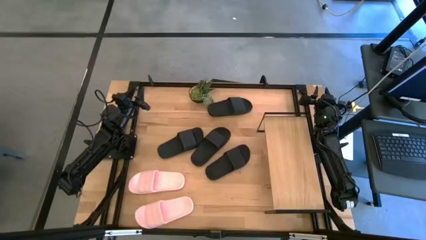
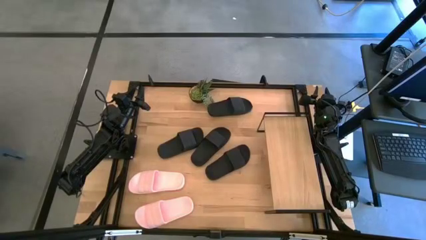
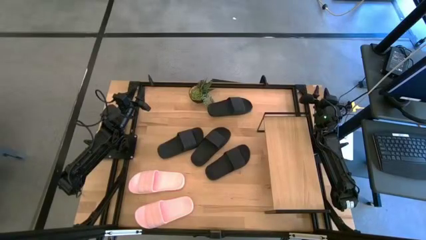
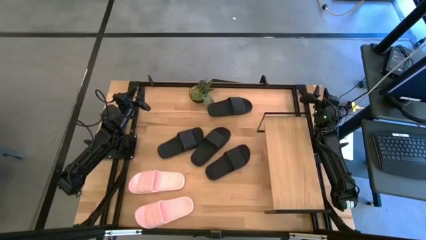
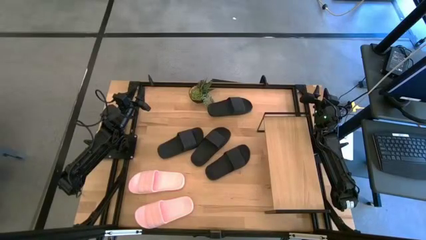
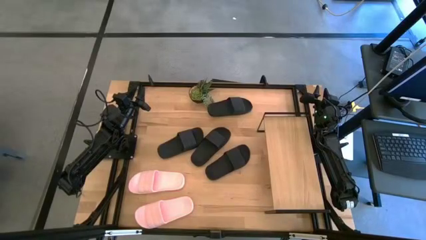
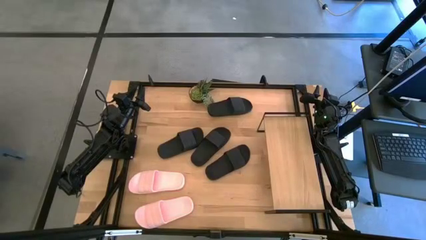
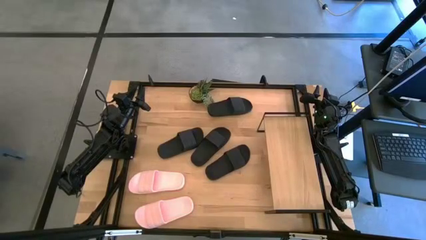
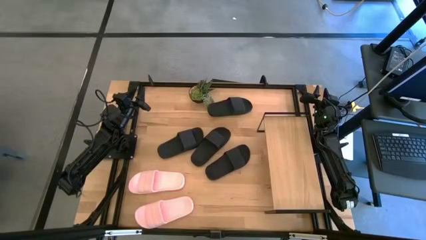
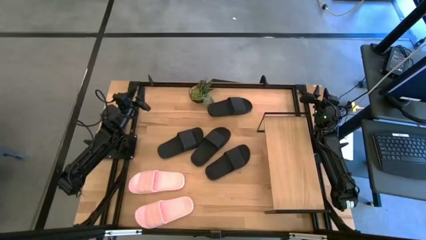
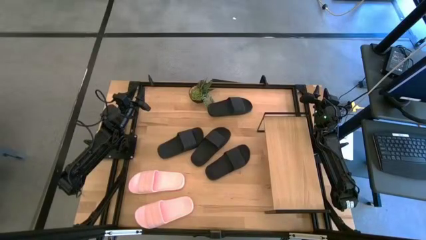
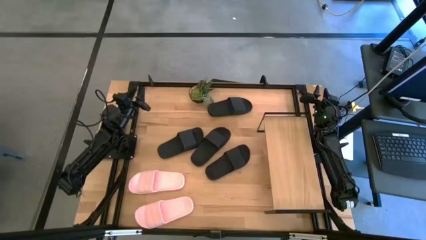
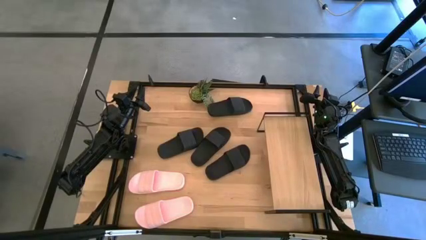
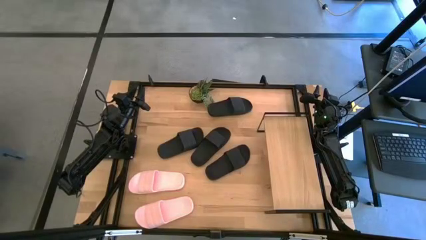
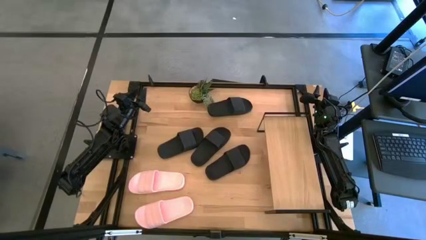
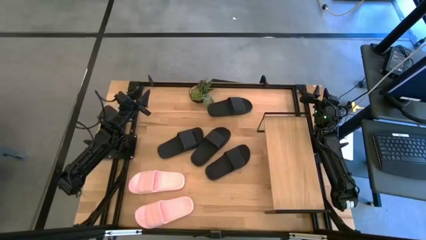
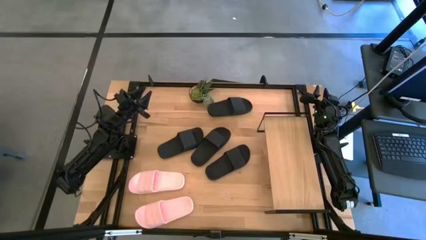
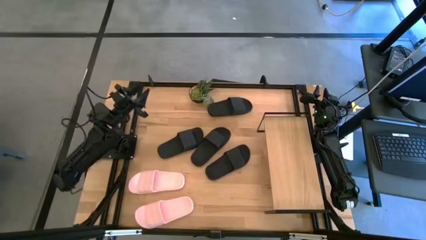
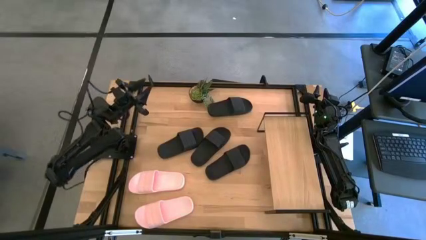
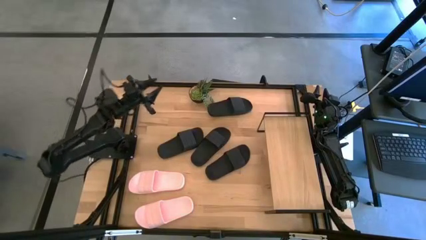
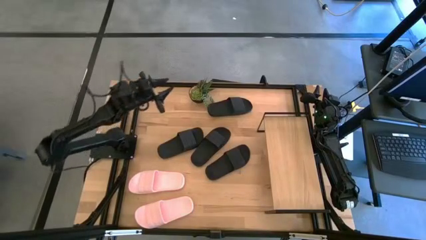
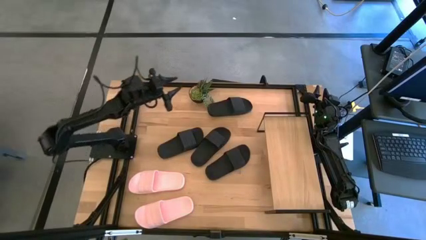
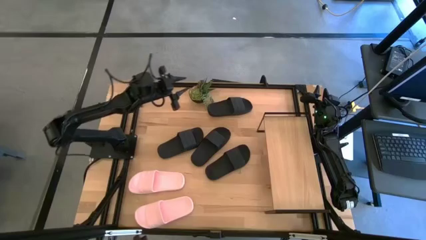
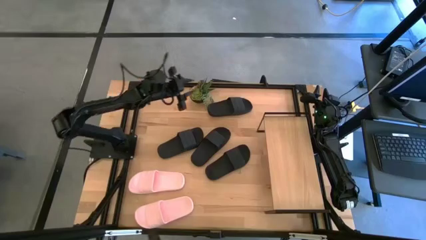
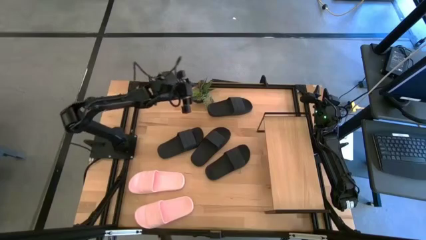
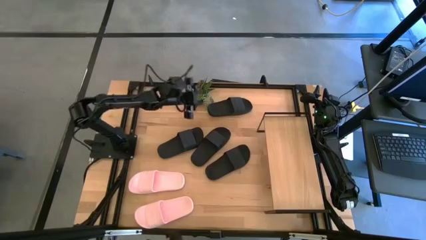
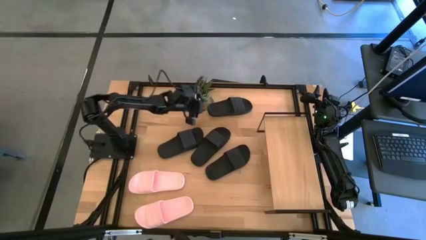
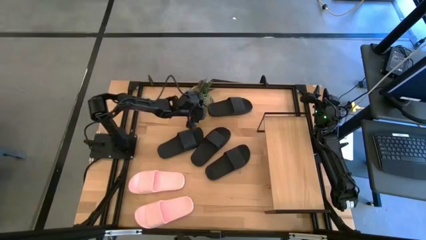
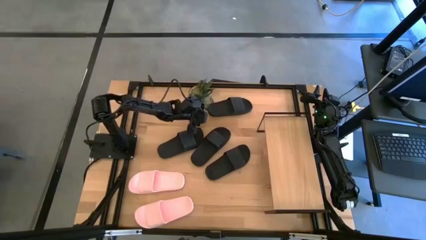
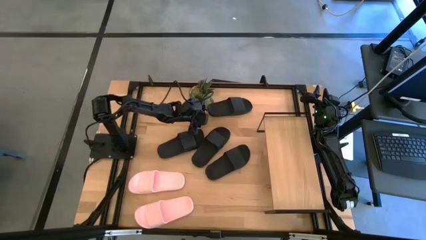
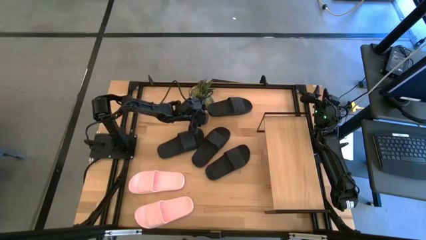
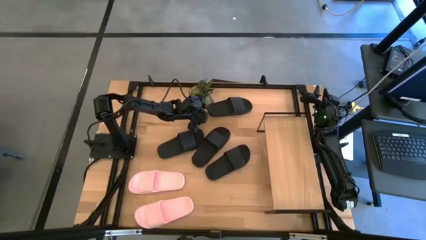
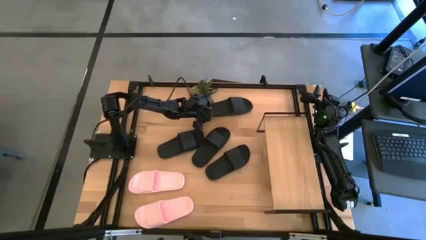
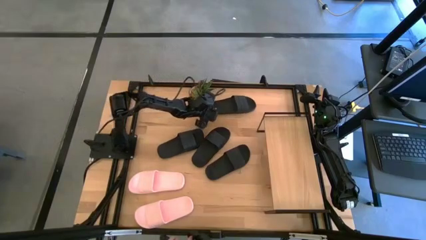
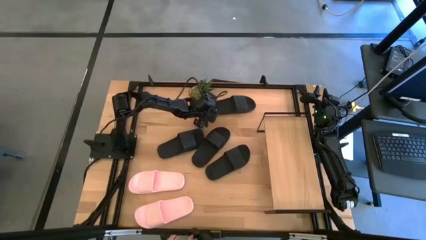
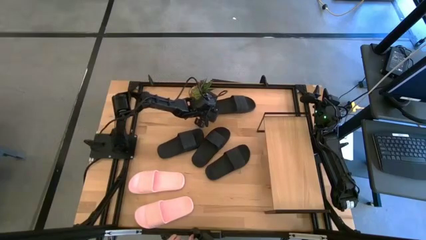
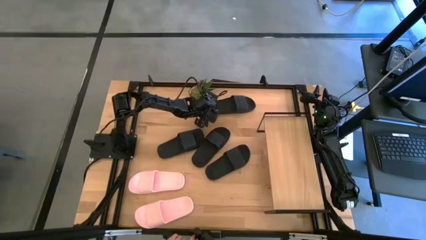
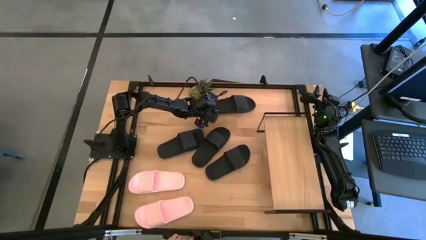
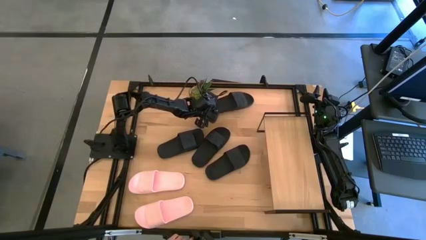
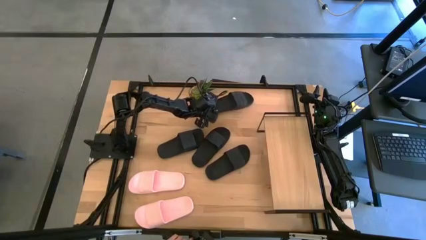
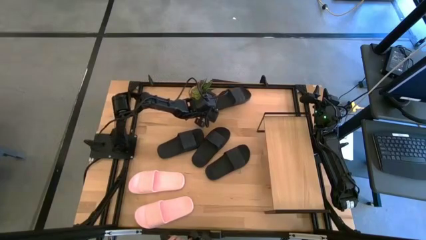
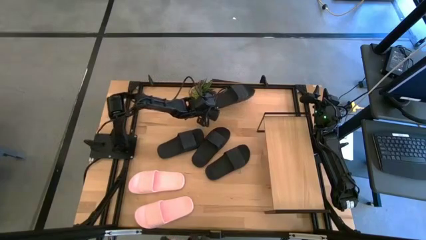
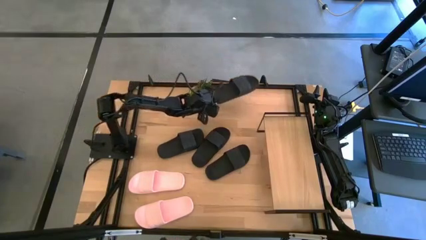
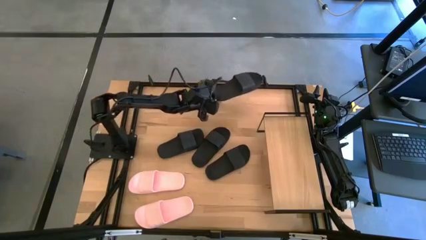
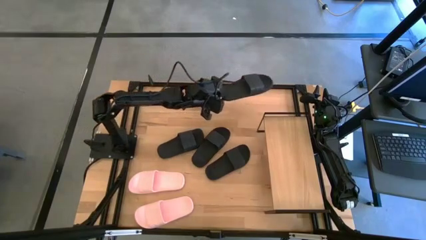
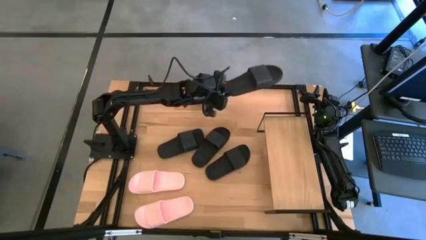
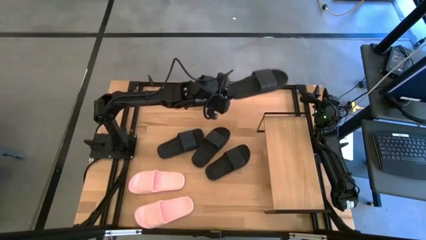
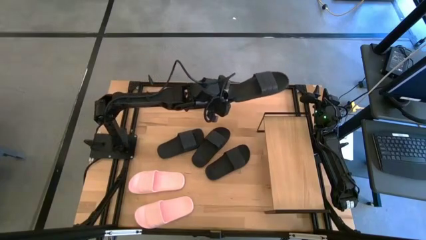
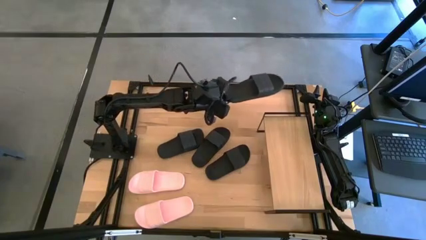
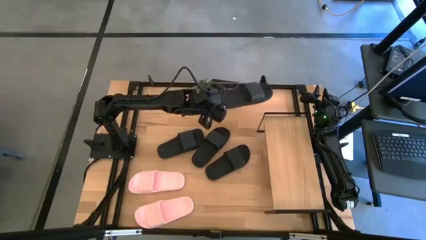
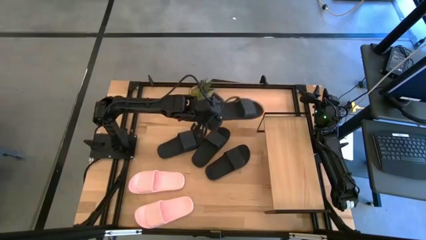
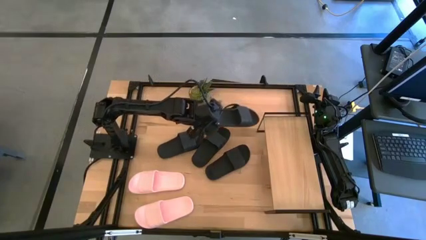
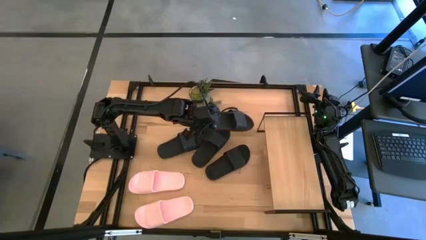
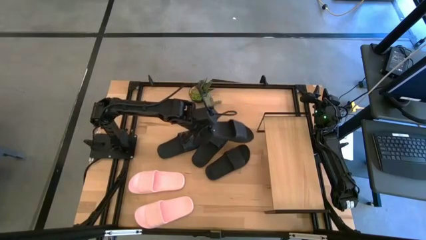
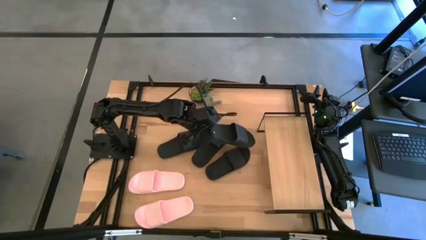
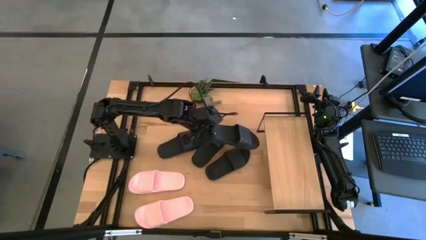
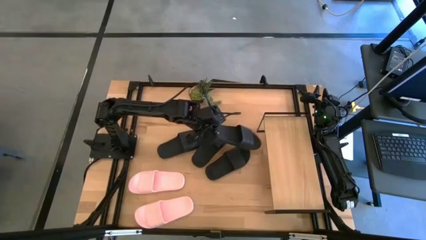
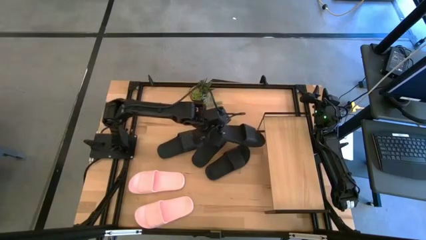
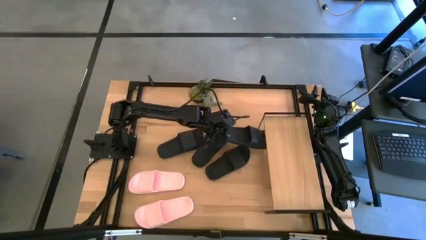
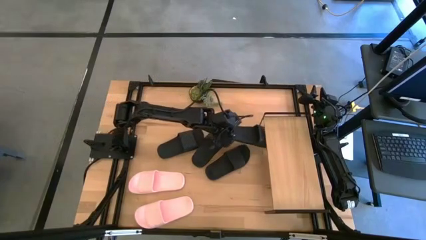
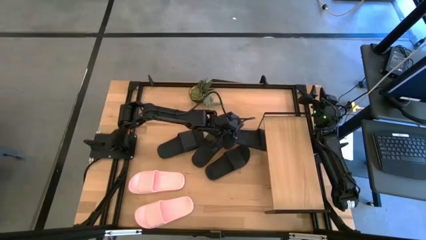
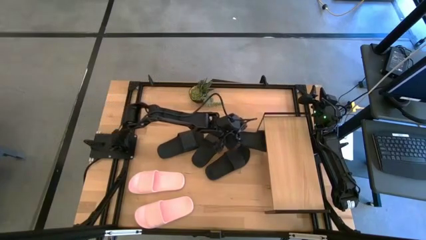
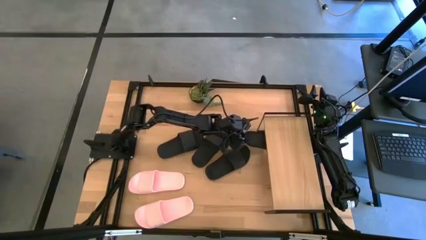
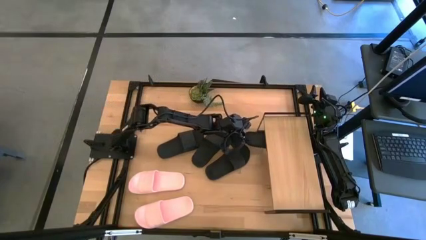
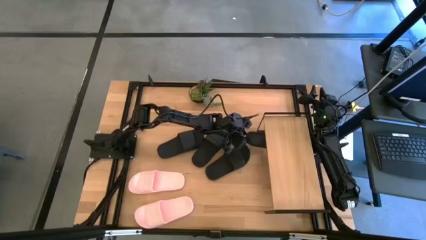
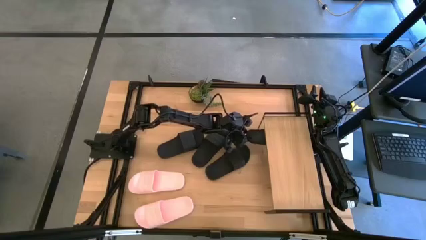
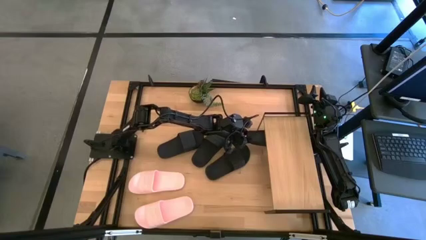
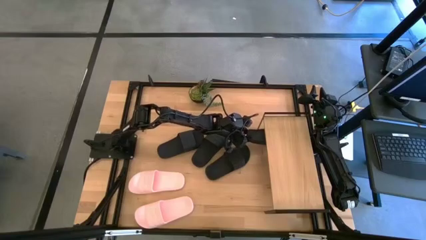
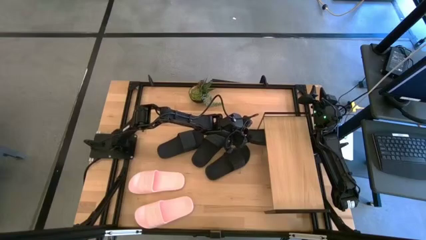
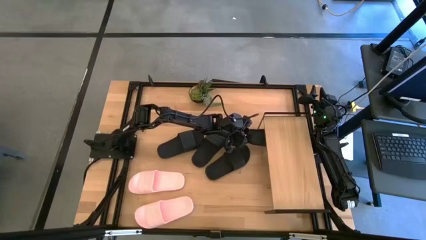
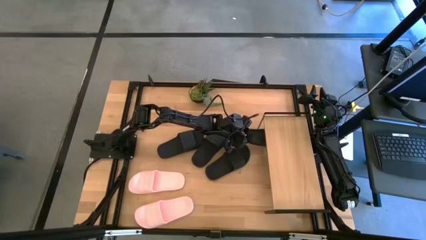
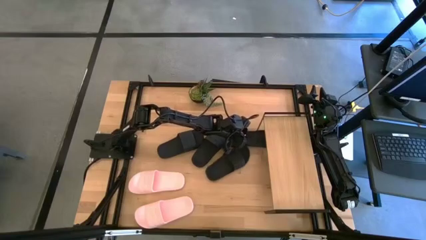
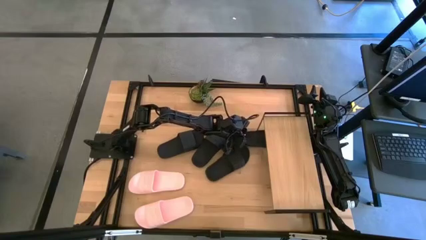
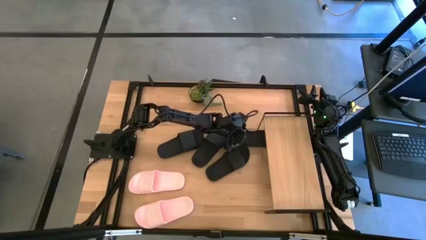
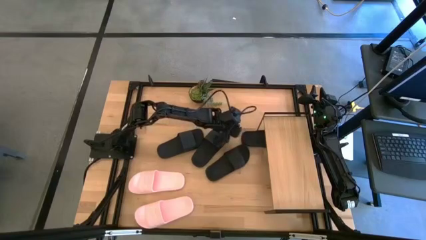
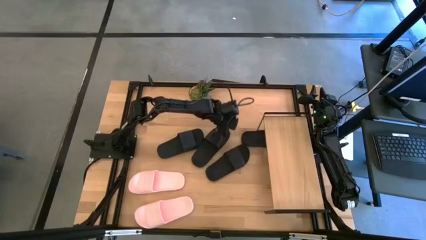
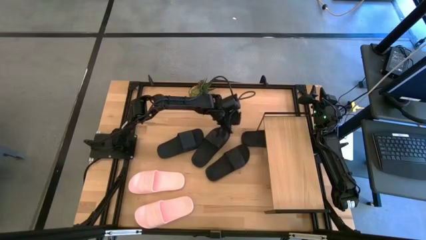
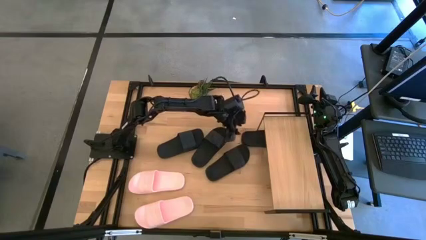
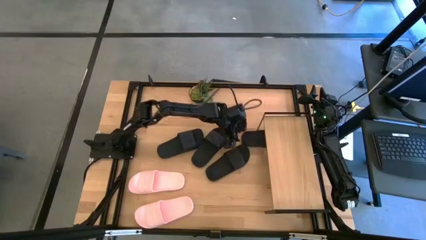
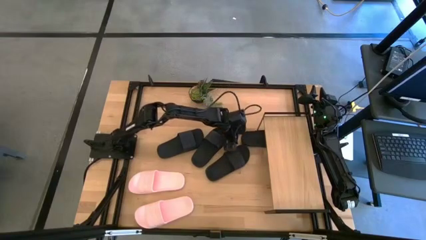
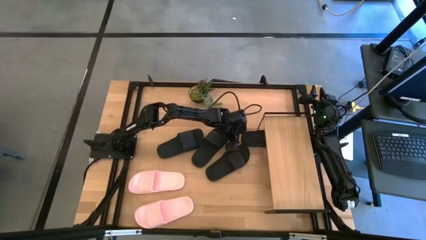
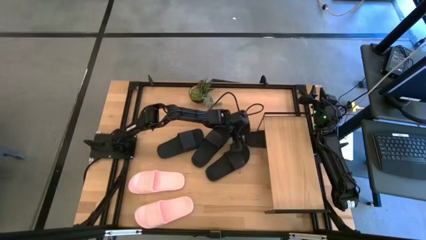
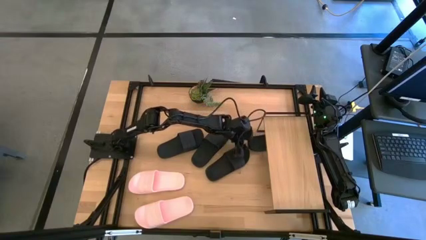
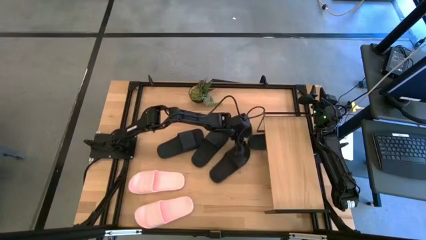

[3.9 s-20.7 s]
Task: Pick and place slides into the shelf
Put the black slides under the shelf
